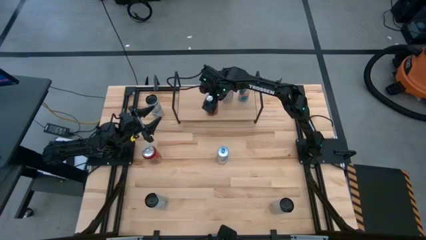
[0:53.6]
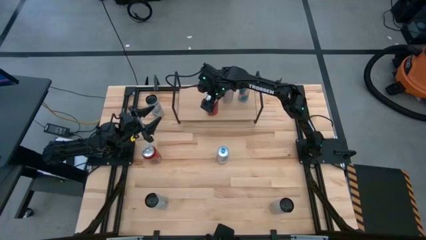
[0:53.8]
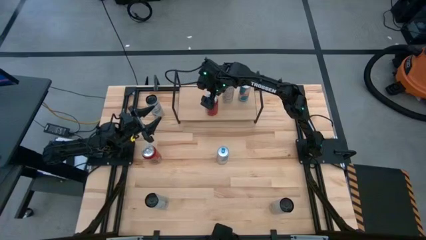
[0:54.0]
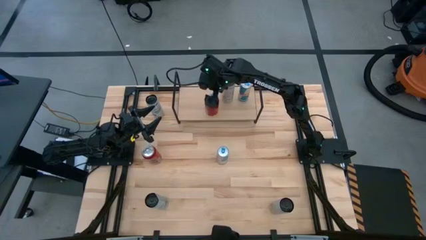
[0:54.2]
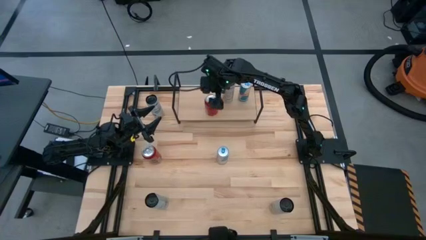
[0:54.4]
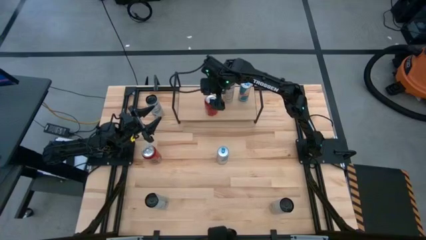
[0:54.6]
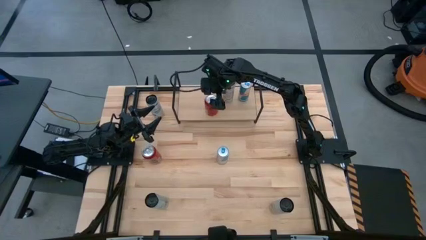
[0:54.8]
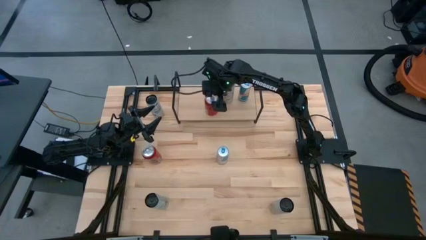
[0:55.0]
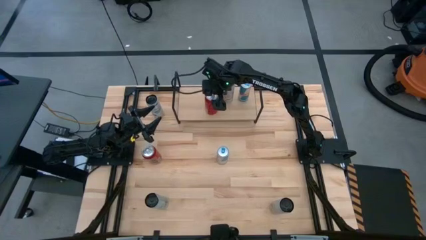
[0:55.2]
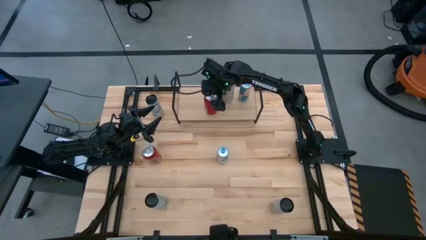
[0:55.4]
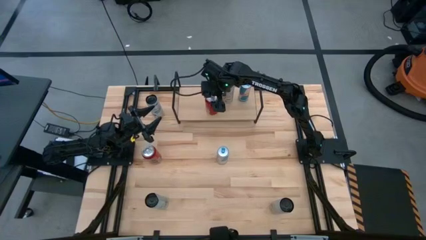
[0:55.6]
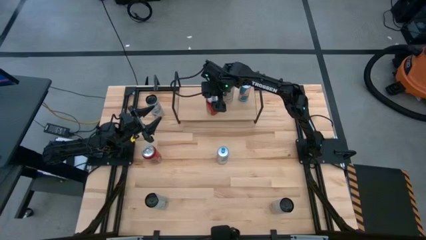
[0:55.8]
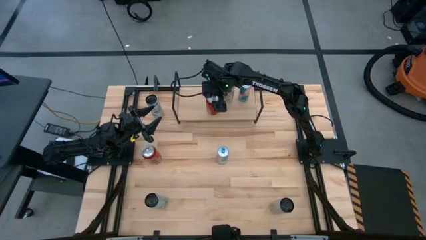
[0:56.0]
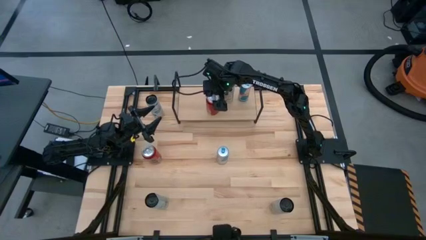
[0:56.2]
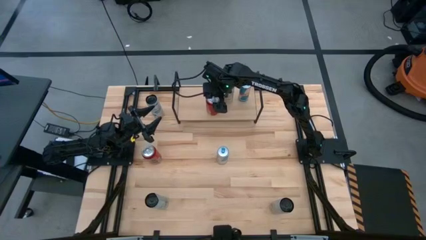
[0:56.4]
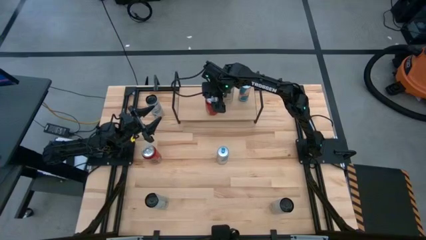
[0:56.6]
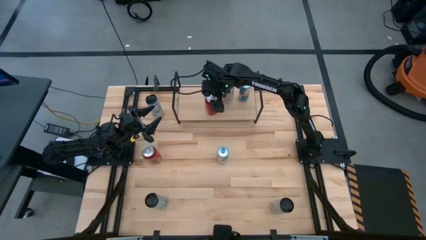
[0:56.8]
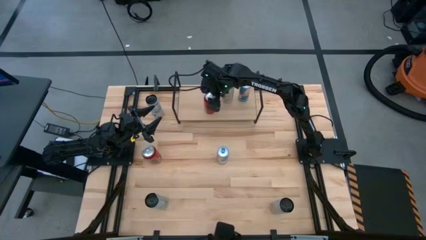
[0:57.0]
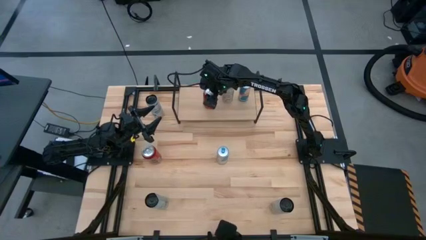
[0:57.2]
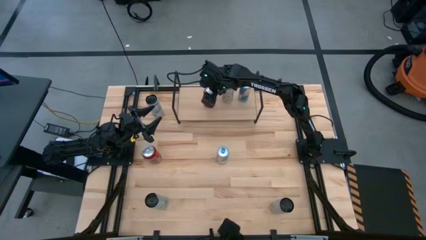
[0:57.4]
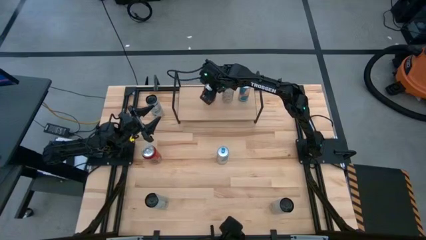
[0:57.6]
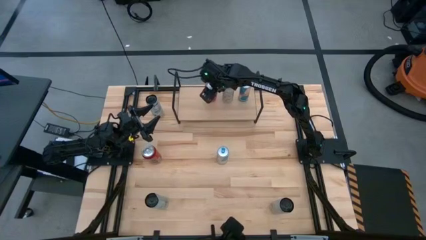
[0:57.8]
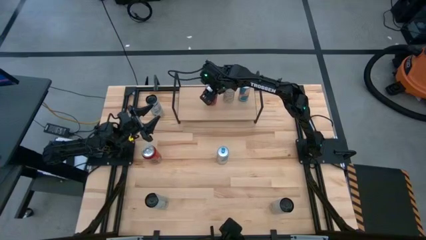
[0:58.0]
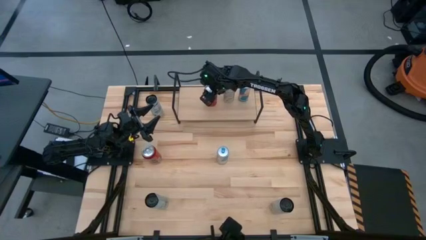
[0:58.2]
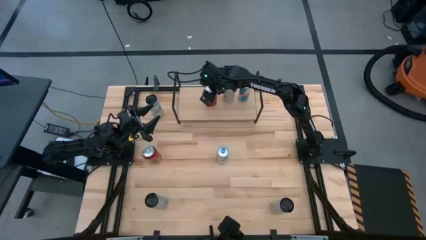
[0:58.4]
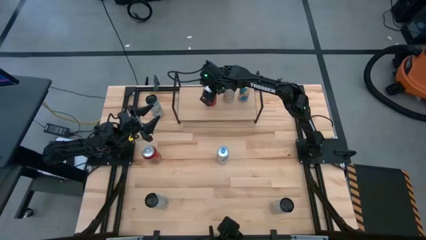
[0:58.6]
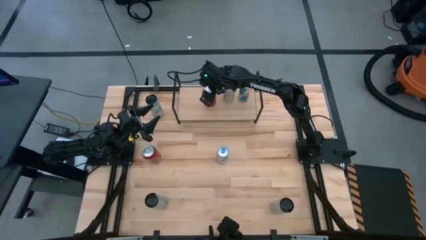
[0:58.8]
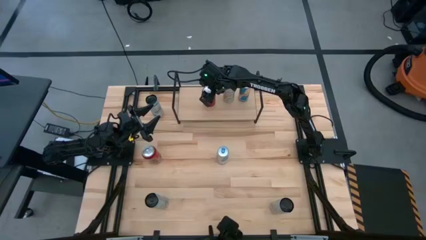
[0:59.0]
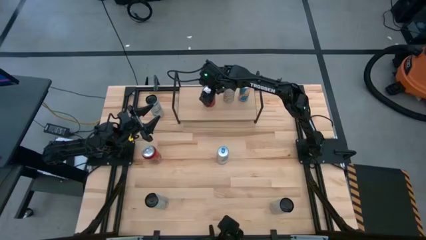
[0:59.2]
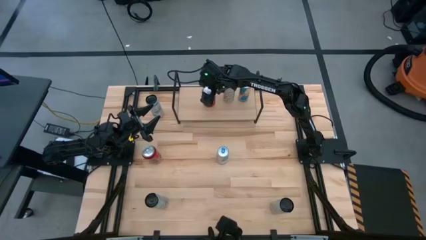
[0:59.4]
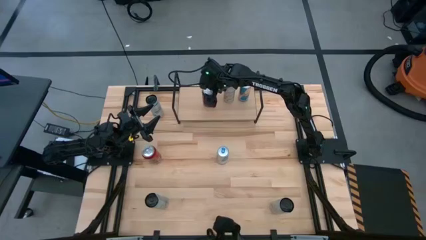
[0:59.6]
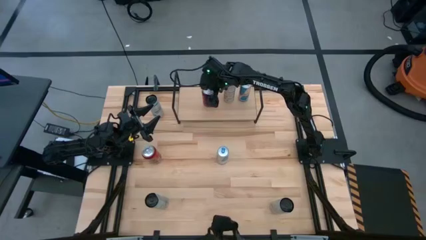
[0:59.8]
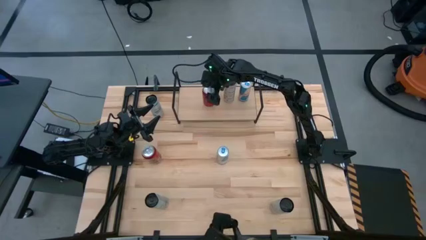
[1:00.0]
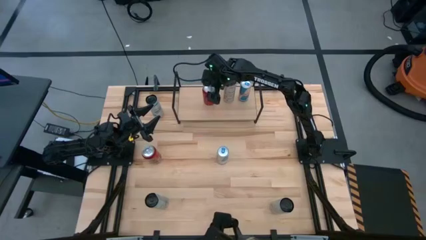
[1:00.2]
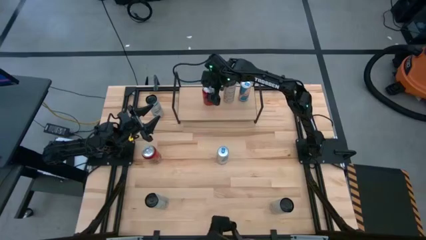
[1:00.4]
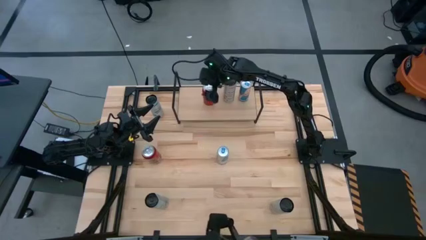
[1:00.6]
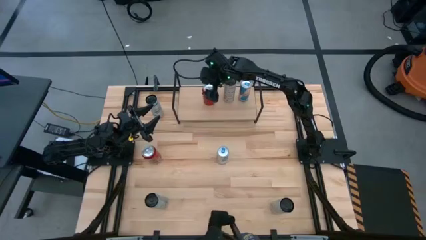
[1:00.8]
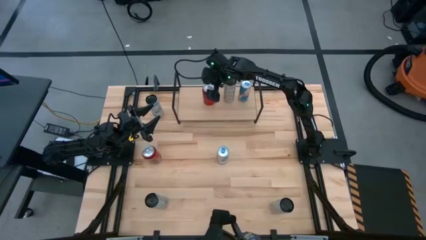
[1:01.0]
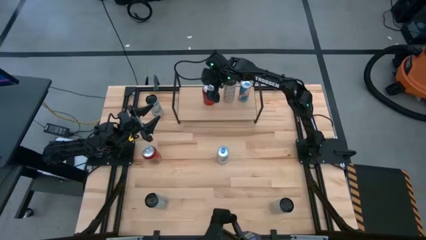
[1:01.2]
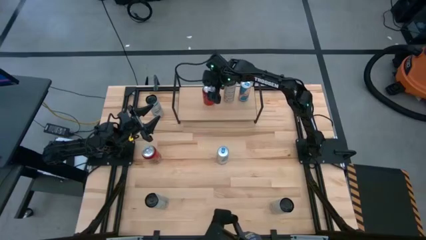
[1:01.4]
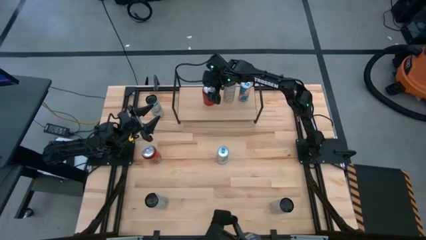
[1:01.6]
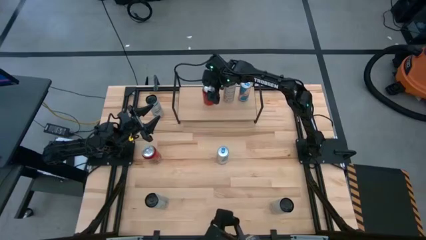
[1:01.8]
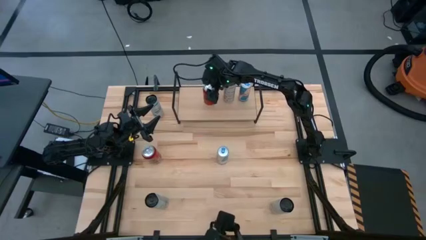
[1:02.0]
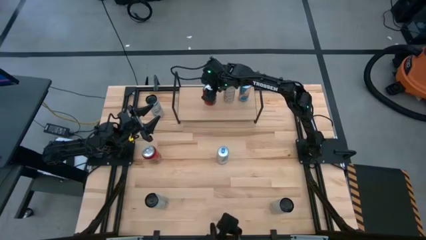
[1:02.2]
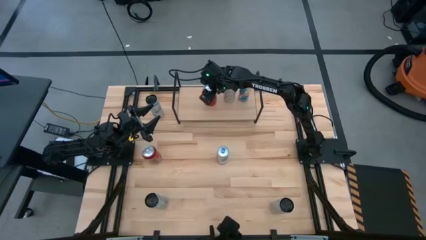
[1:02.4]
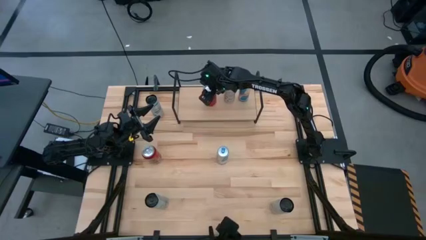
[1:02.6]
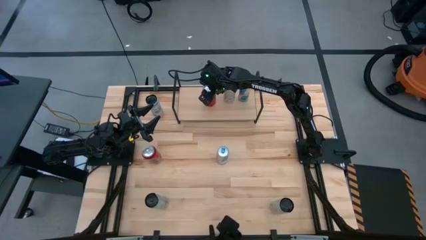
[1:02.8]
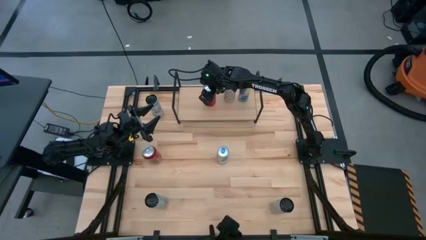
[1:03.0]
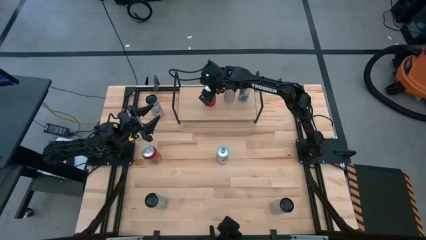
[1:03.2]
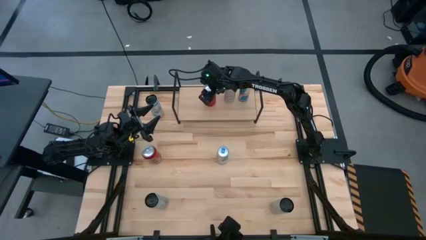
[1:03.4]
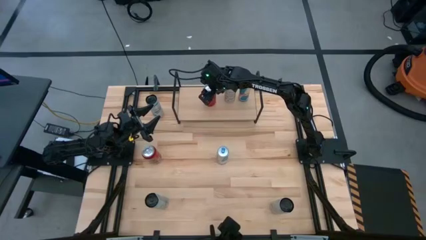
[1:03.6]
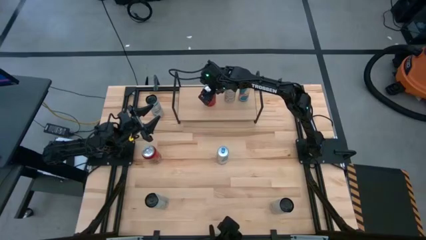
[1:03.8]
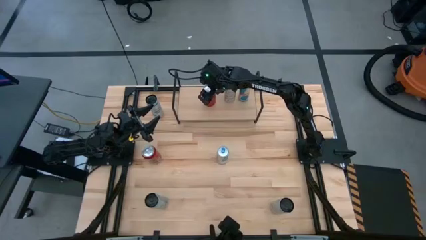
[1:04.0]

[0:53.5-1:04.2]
Task: Place canned beverage on shelf
Put the right red-black soda can on the shelf

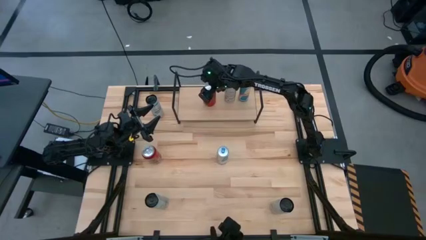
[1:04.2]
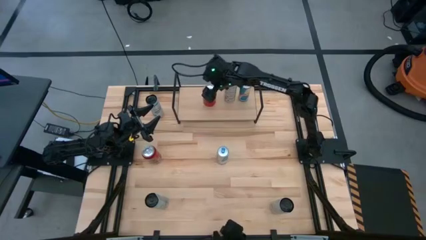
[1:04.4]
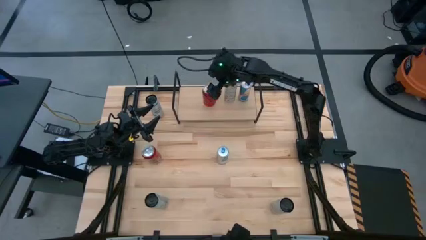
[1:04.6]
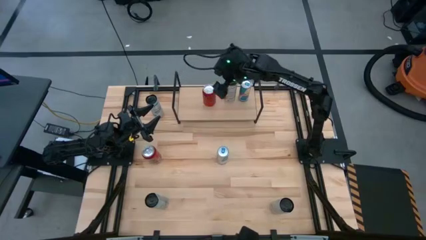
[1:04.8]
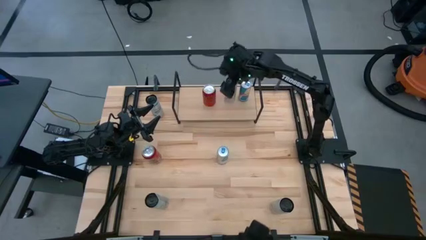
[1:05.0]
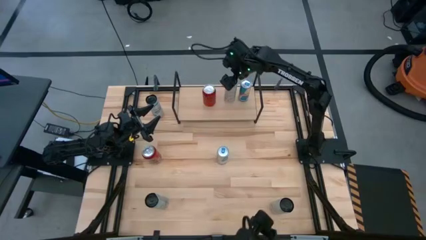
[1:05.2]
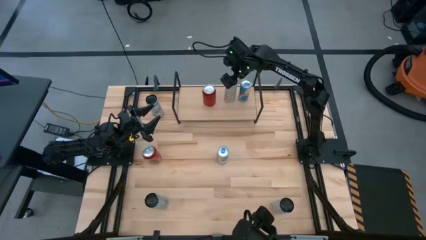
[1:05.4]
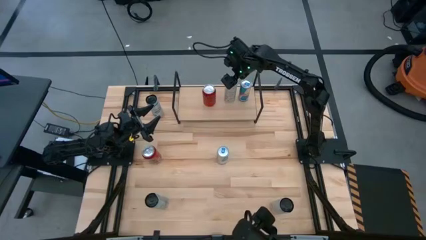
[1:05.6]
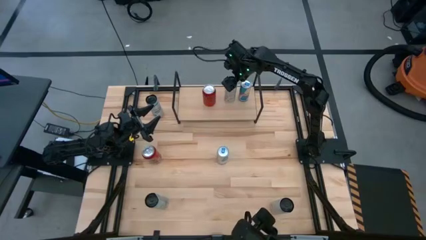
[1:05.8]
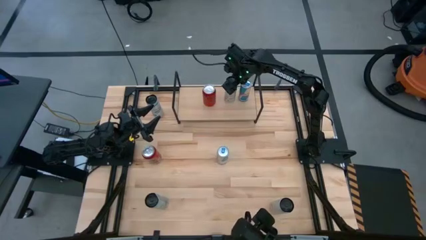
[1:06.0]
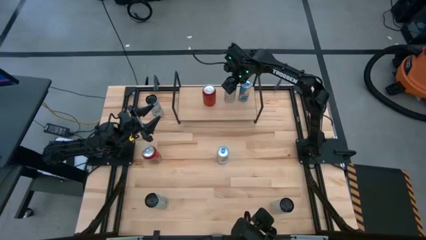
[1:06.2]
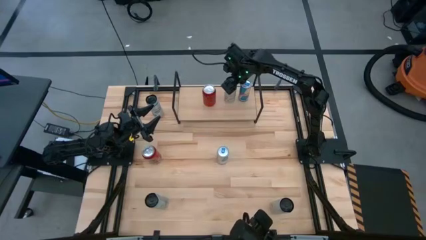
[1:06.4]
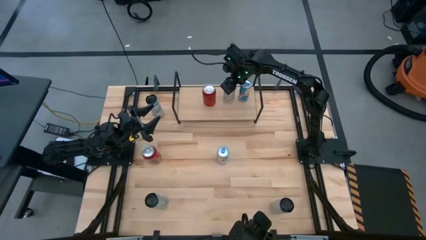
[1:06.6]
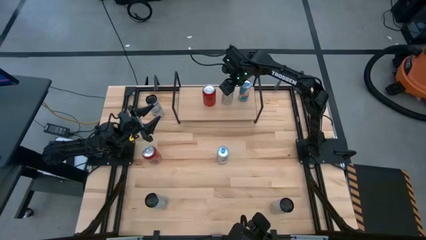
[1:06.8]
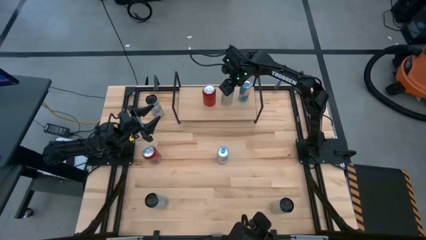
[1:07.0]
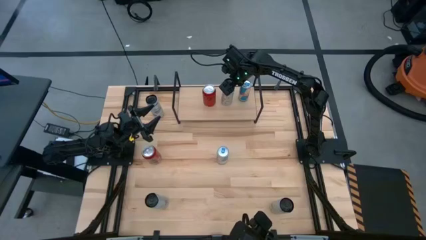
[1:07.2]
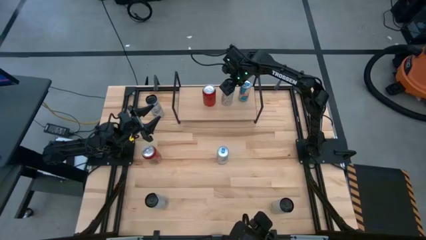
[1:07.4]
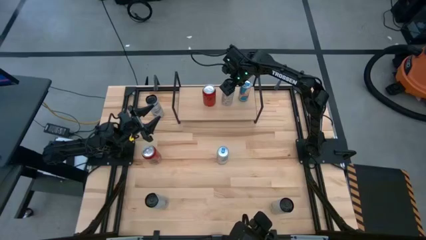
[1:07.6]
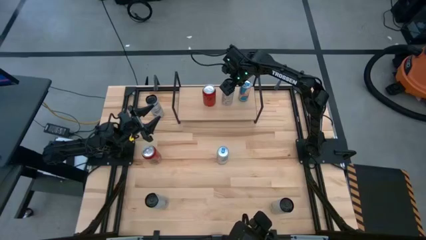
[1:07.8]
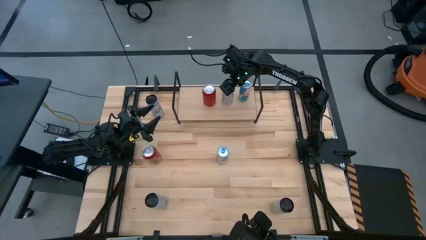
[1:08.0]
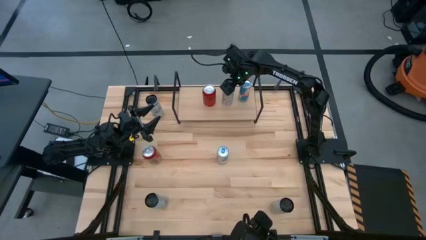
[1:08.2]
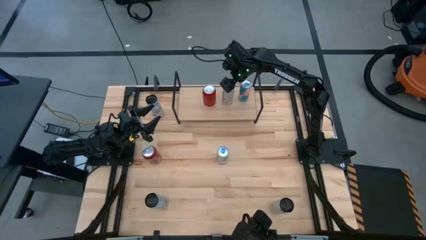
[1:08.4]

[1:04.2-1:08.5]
Adjust the white-yellow soda can on the shelf
